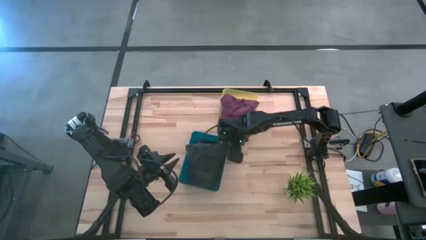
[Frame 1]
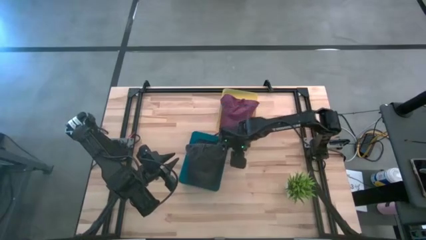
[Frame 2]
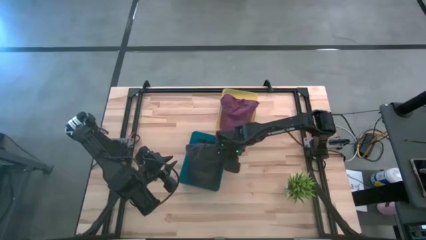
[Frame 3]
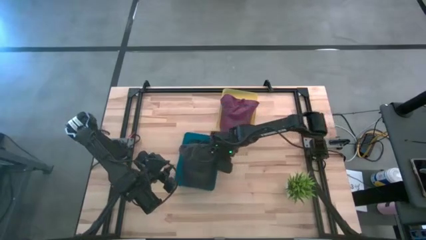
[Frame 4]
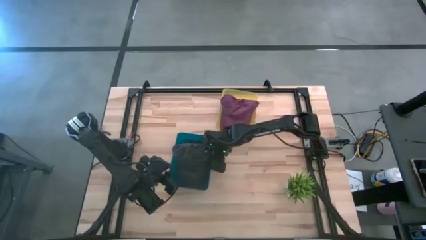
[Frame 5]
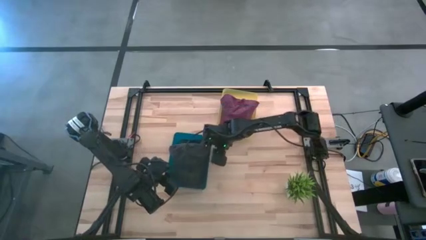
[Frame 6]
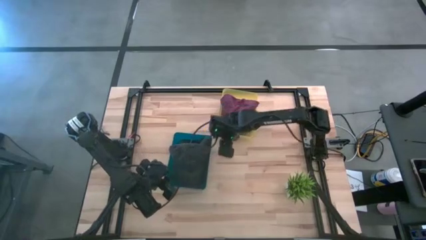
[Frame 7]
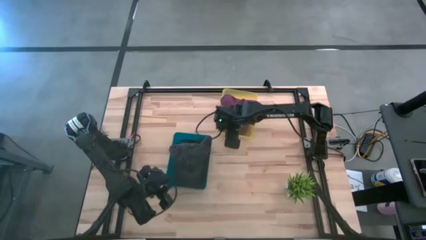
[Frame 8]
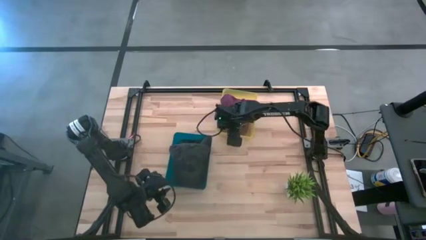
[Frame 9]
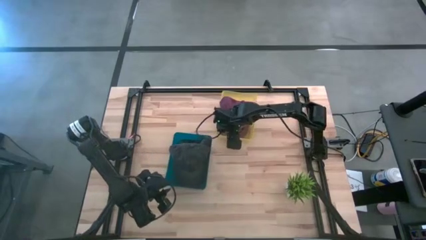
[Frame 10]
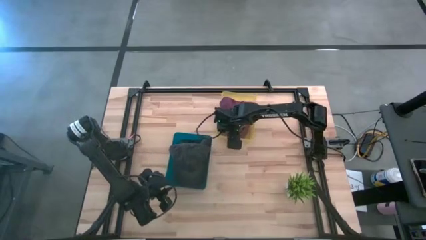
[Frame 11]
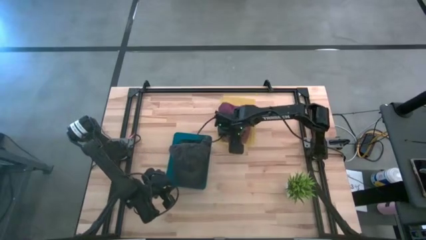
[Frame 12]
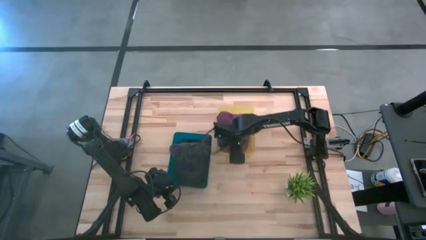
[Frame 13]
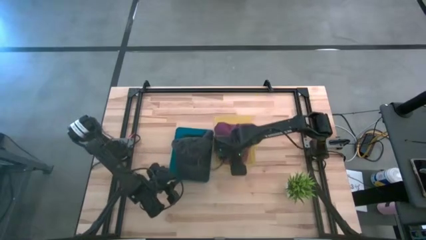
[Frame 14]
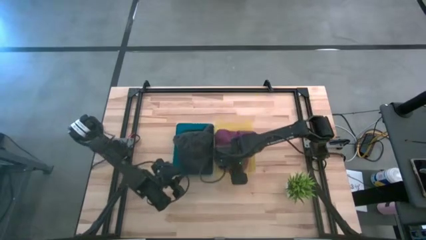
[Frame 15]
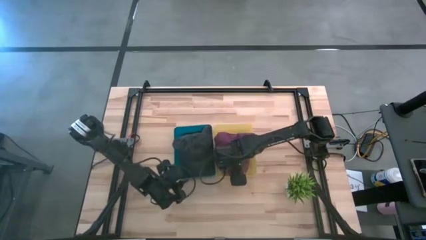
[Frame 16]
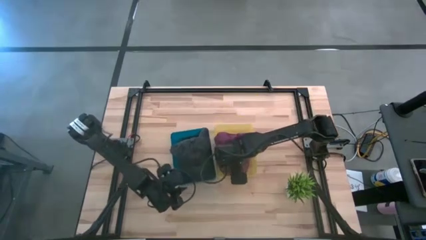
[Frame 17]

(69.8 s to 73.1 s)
Task: Pick & Place hat
Adjust the yellow bin

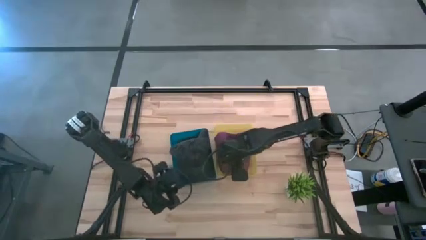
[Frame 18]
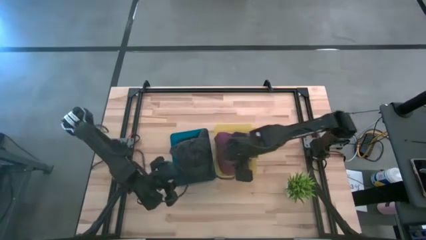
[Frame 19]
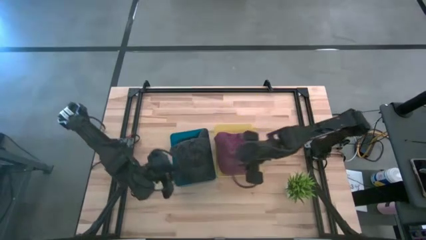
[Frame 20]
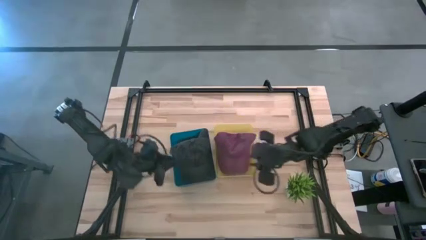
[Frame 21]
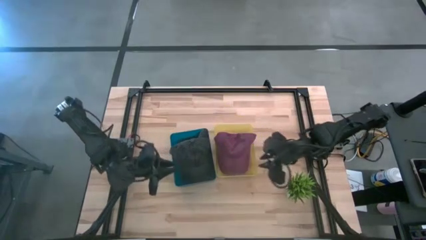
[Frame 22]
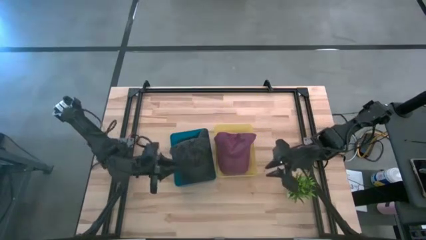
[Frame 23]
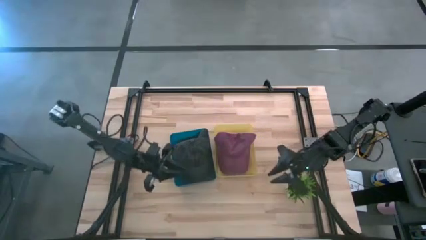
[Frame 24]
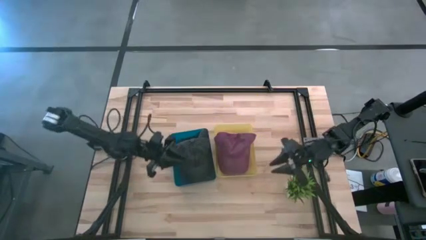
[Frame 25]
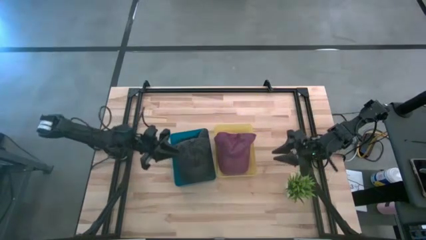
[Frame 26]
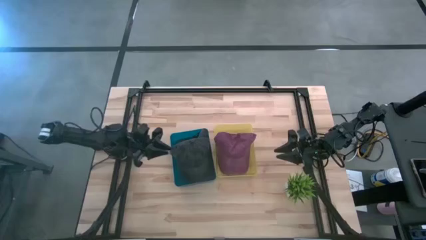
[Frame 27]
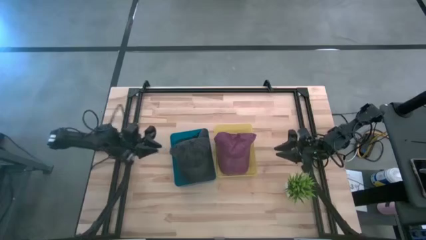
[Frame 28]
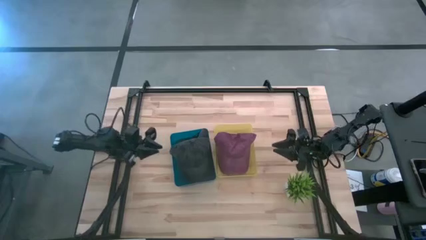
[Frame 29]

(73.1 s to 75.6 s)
Return to Home Position

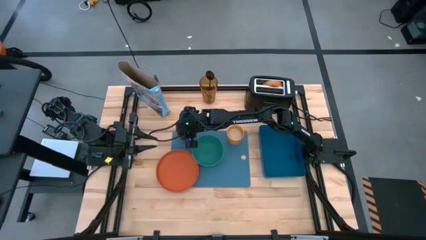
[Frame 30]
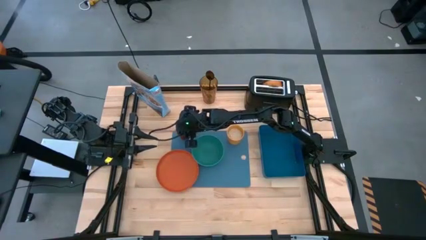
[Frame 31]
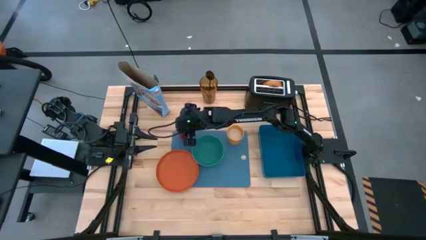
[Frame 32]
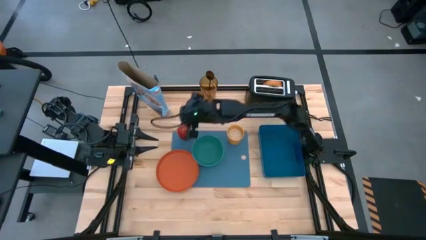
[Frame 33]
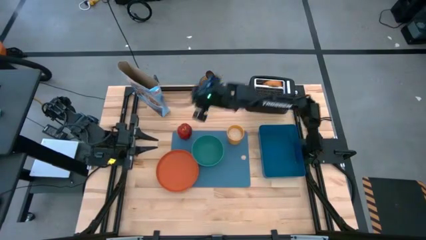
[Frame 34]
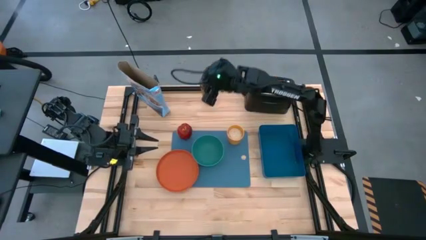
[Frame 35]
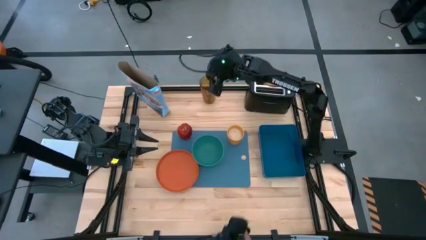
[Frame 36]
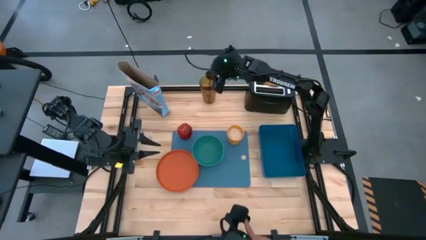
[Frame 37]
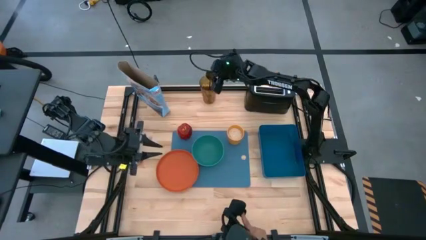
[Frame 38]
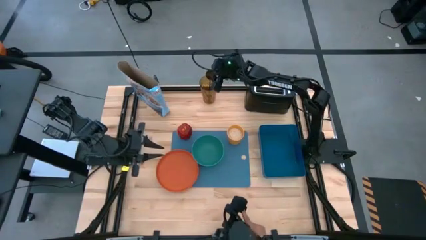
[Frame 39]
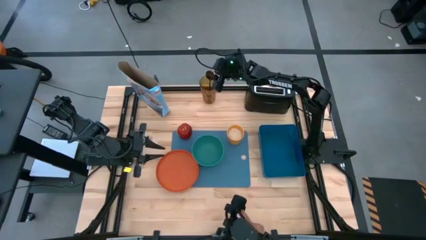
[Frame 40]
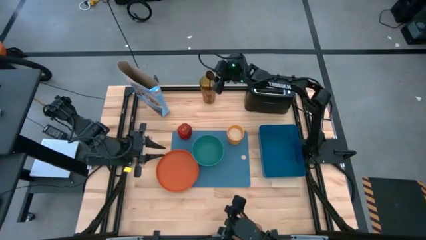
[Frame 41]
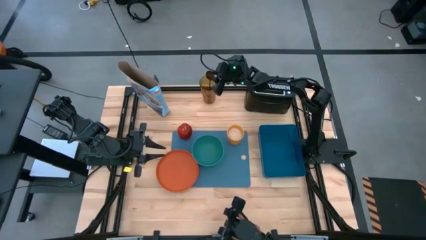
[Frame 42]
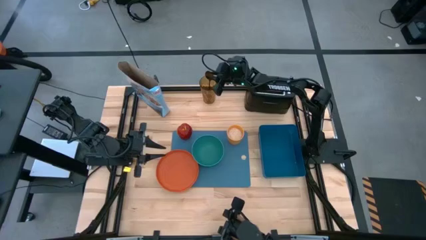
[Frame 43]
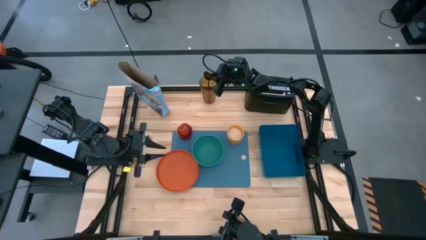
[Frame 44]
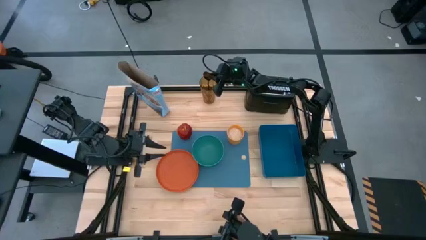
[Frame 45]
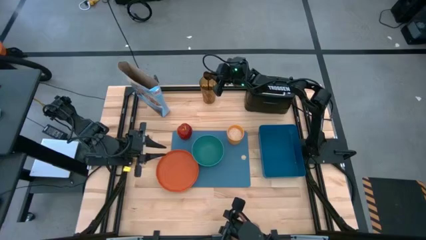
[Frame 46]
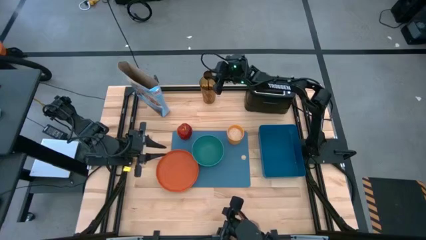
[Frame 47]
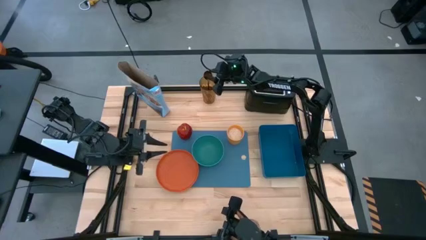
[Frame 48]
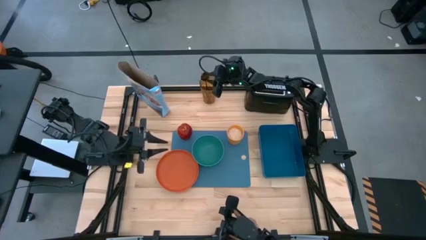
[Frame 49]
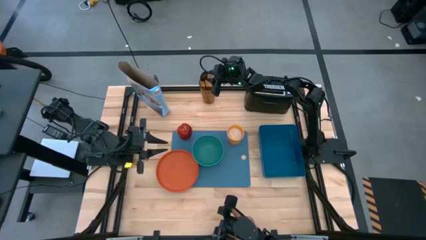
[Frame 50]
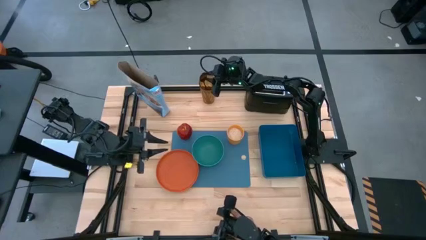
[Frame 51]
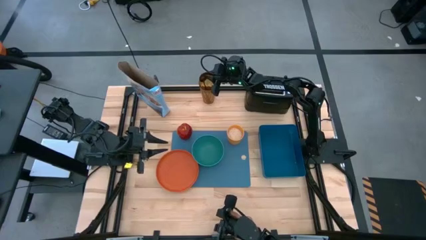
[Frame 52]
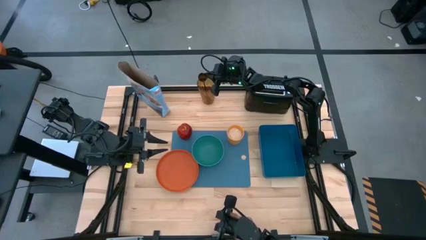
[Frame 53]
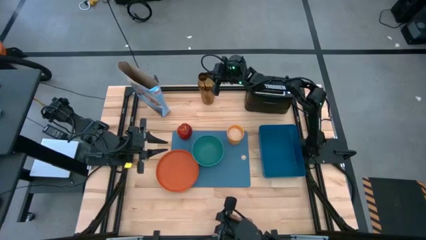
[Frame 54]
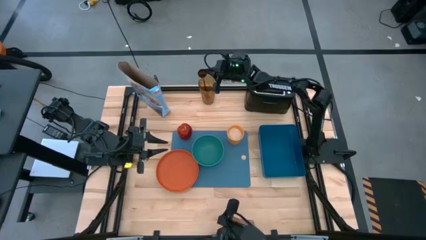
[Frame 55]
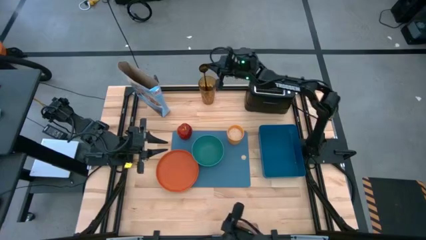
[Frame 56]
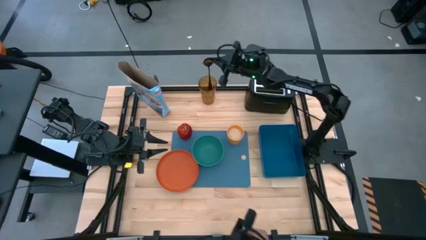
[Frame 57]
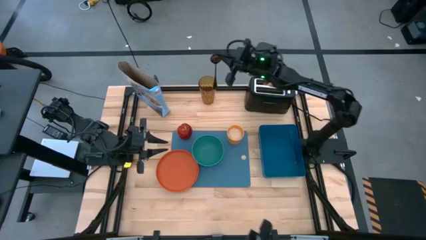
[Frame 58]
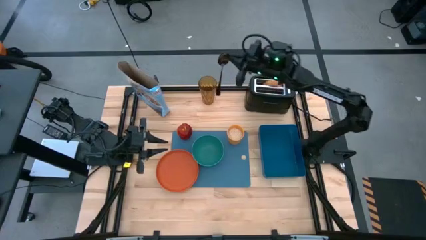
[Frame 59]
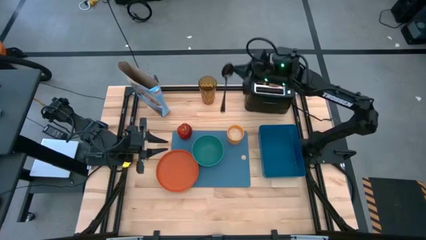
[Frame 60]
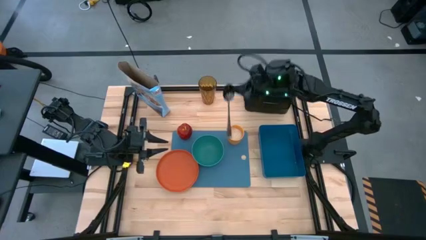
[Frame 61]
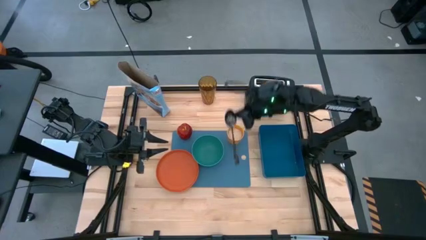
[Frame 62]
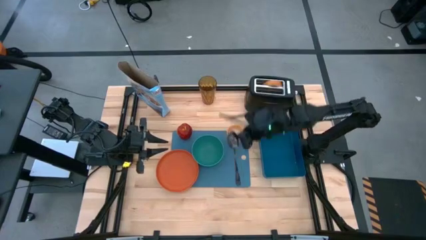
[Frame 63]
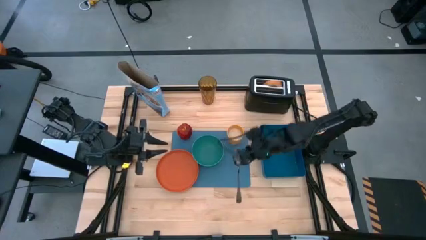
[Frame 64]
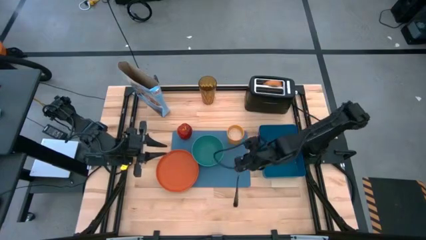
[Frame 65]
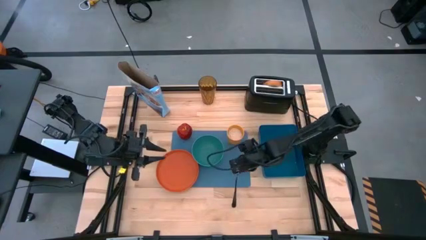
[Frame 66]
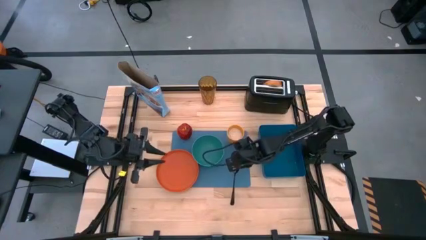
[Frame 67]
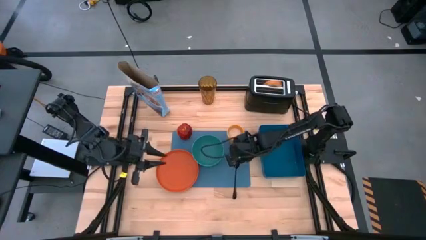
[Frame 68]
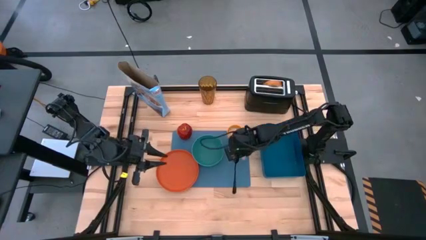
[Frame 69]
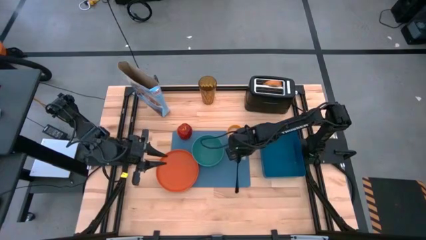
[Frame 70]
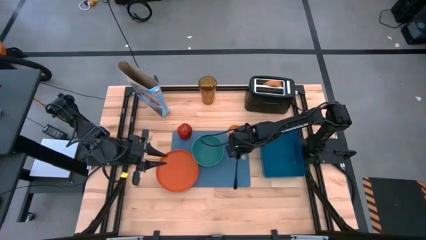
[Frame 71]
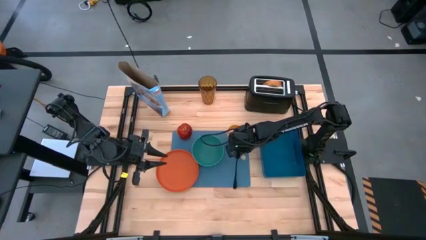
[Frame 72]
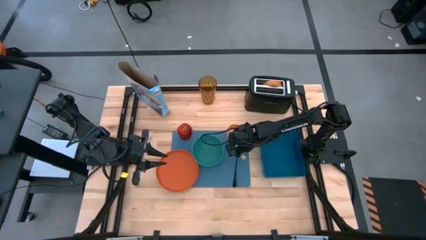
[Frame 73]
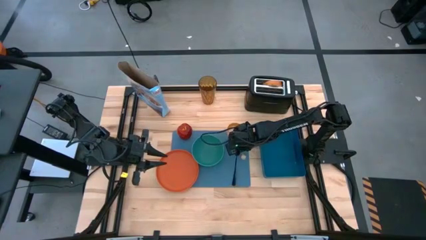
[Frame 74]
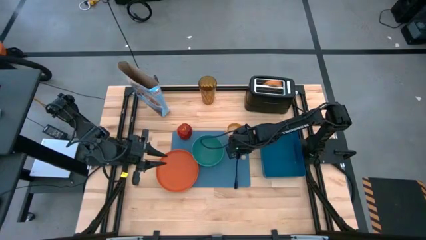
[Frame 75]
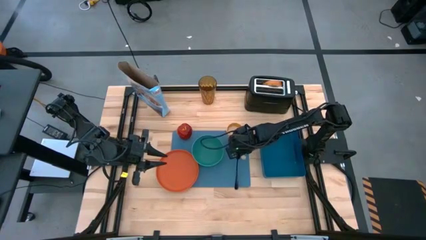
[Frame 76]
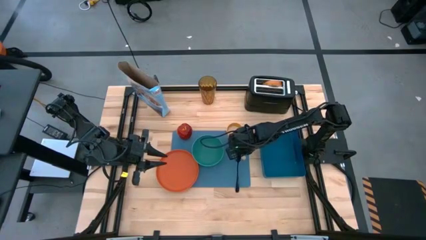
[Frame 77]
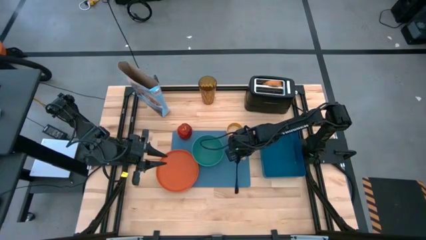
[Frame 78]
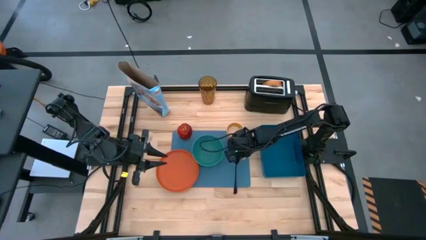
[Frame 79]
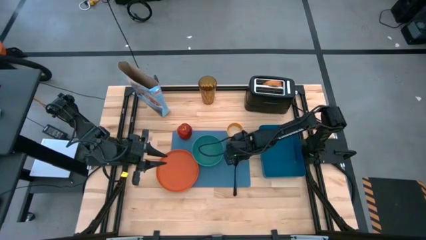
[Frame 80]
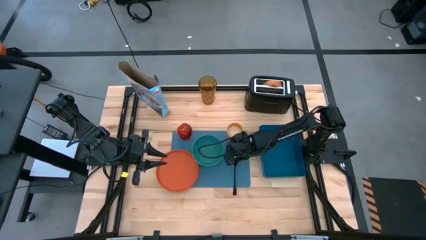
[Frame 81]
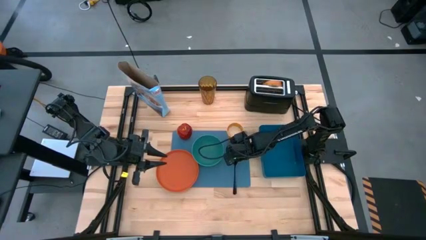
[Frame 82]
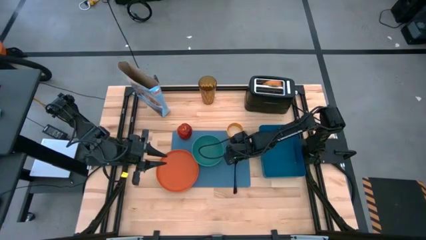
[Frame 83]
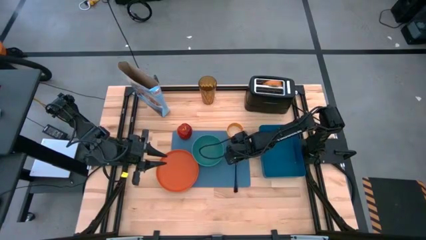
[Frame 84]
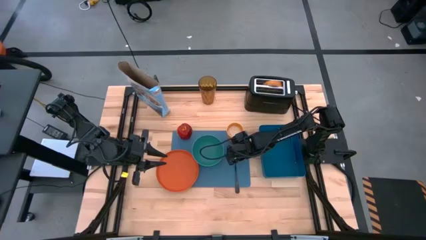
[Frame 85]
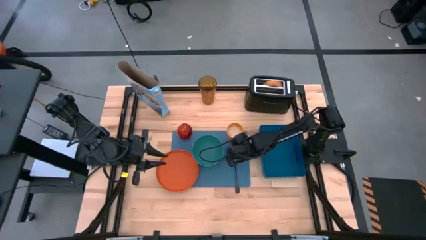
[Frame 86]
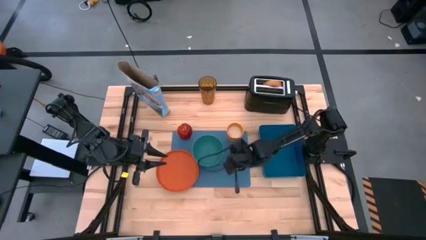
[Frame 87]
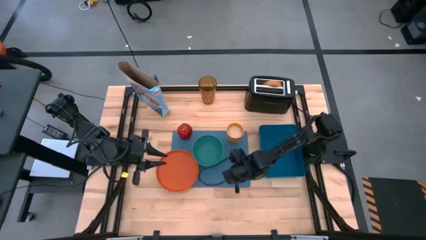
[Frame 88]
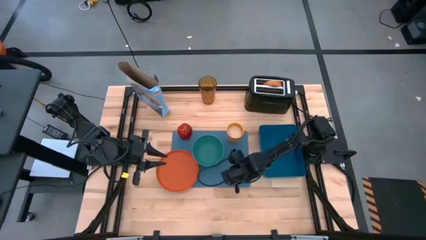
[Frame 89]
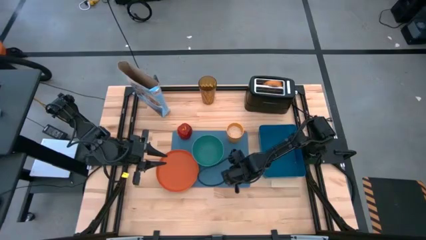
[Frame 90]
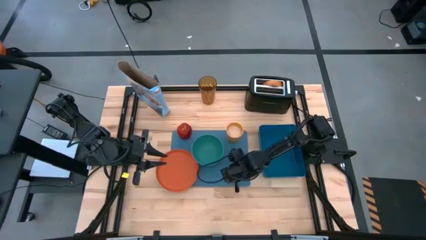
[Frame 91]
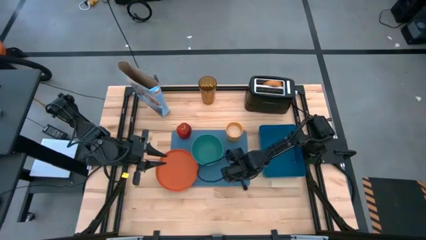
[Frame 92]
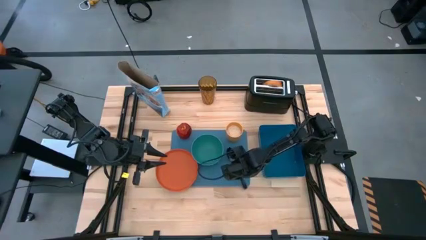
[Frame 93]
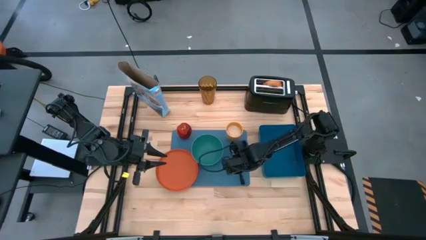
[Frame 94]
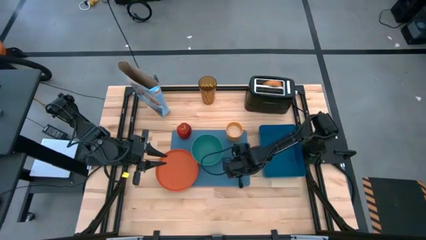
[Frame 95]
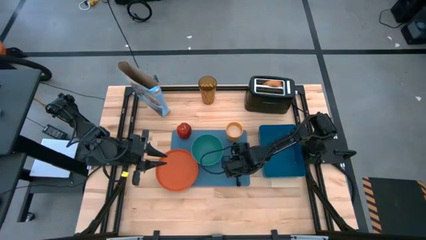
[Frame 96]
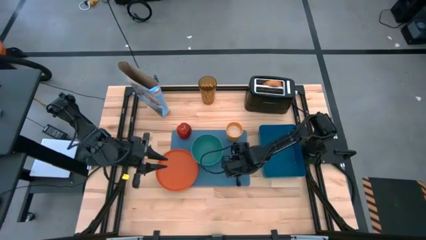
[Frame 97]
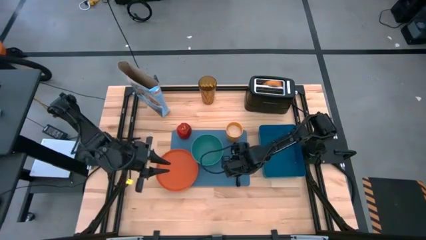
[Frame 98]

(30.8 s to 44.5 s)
Task: Arrange a breakfast setting
Put the black spoon on the blue mat
